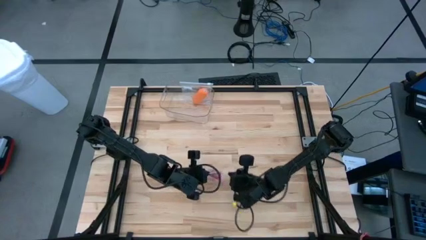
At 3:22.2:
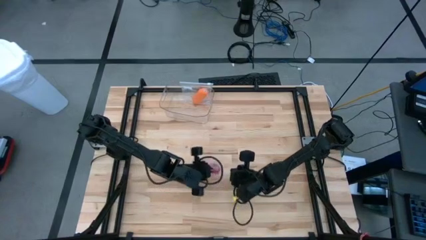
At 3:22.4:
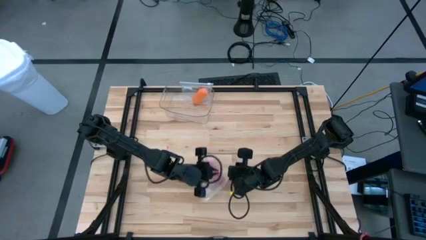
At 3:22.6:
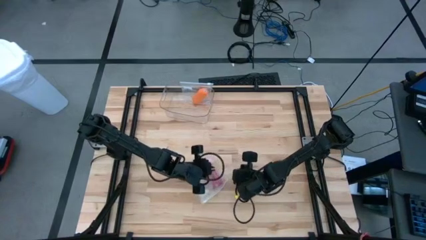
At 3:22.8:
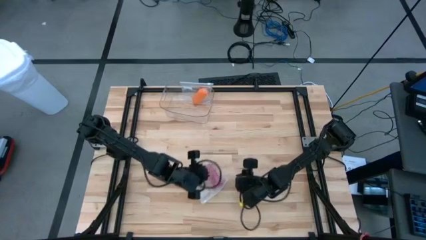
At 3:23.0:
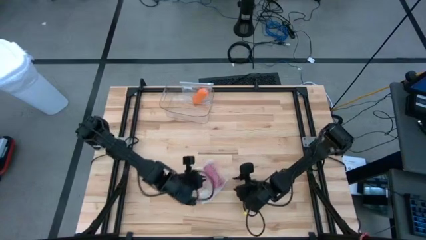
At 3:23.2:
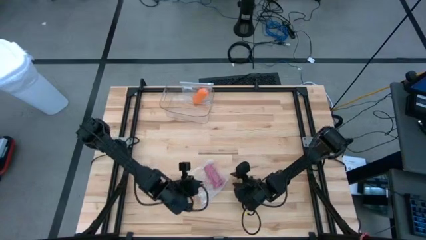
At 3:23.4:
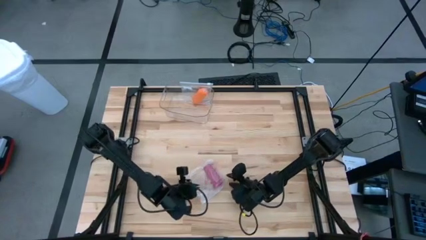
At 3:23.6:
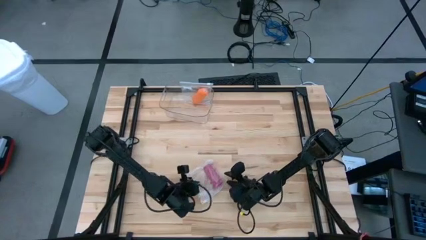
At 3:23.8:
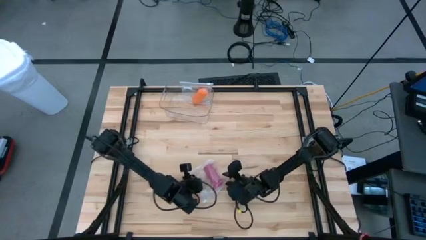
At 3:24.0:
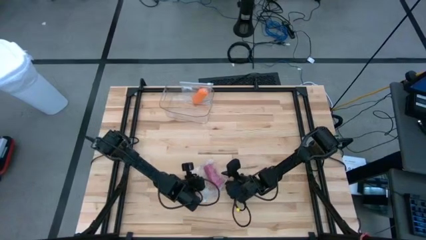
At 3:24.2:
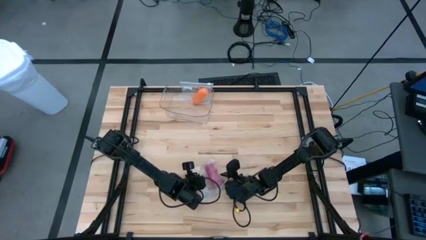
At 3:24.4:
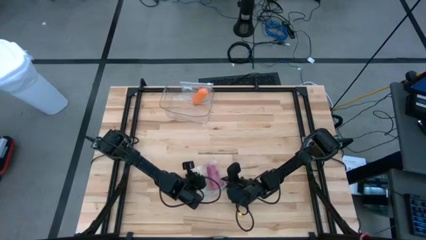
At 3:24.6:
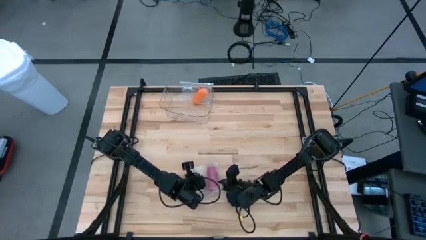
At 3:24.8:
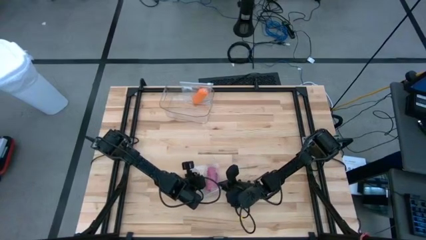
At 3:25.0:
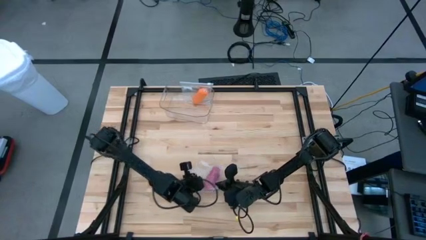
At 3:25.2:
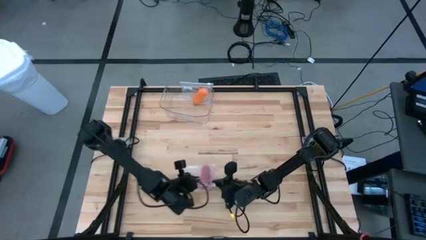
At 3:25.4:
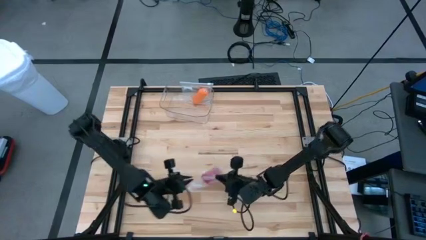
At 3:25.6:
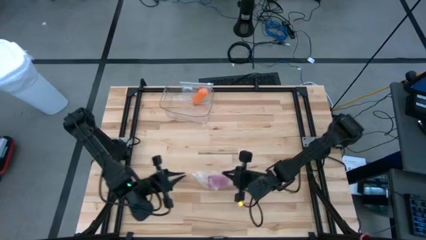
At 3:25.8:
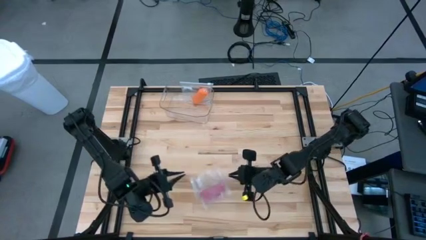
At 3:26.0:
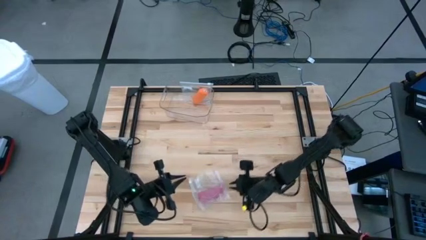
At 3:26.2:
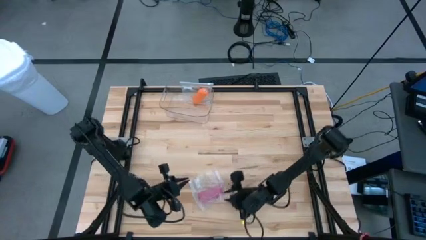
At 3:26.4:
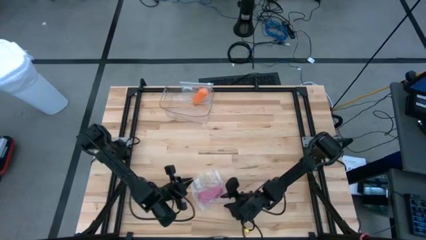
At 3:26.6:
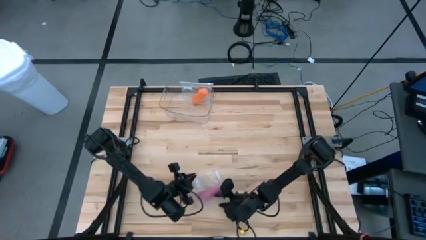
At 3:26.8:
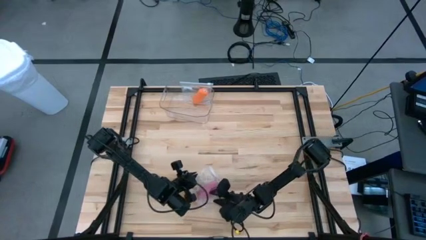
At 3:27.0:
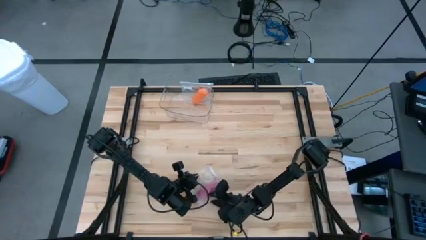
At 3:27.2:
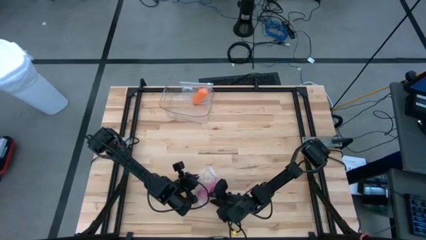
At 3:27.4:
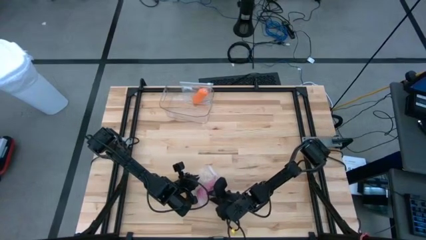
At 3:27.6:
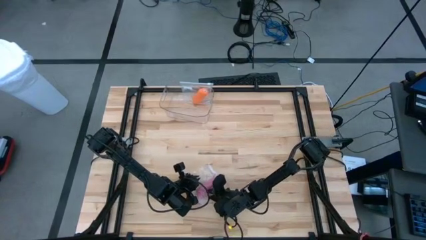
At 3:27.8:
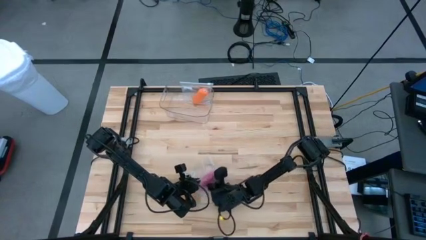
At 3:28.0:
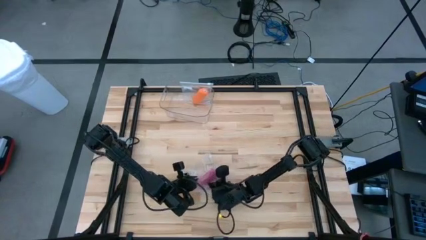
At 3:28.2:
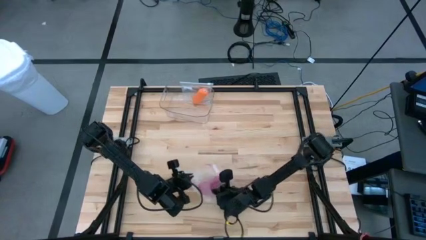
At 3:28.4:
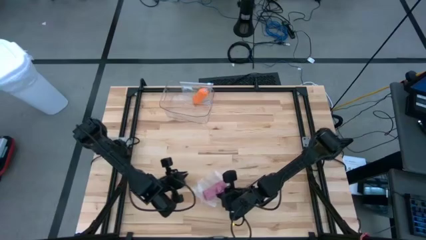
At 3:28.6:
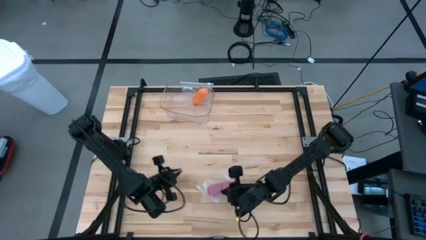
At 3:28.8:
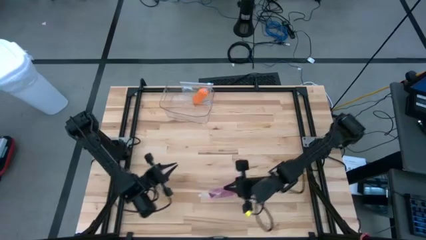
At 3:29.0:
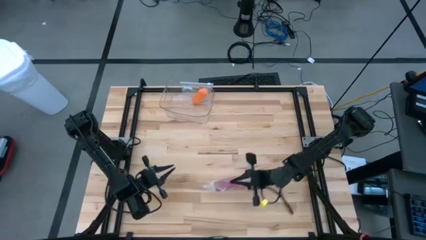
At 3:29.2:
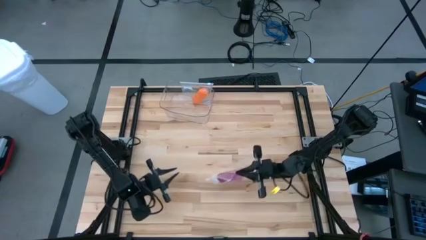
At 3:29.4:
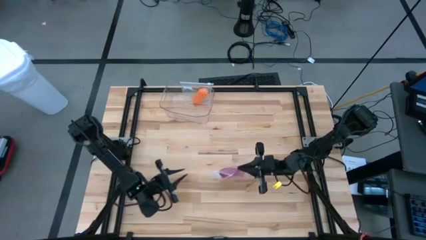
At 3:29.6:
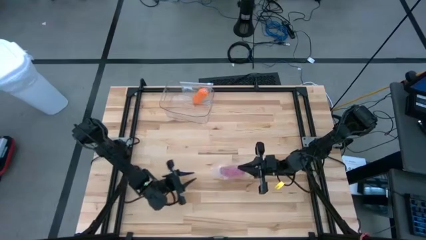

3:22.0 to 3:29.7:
Task: Roll bandage
Close the transparent zip bag

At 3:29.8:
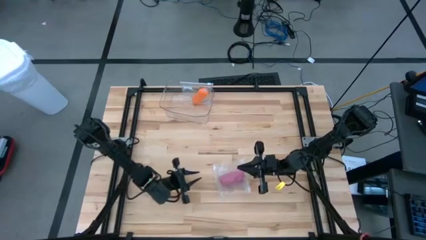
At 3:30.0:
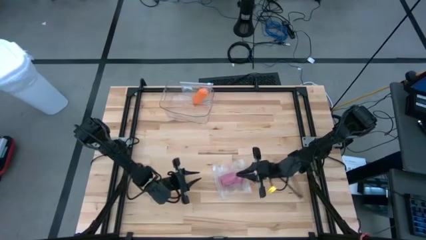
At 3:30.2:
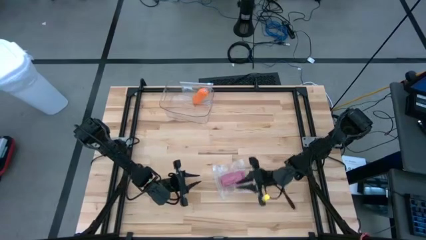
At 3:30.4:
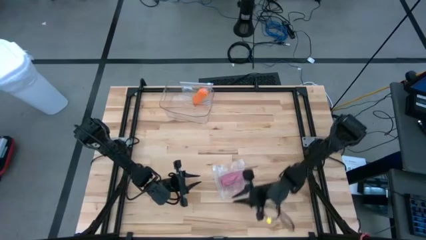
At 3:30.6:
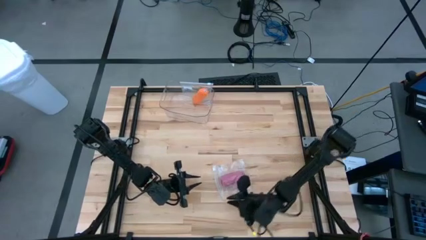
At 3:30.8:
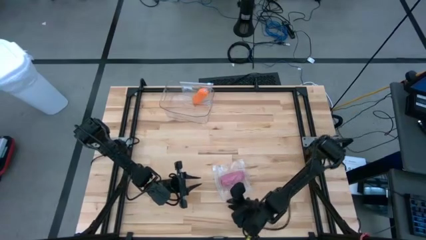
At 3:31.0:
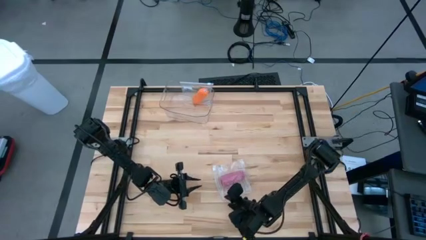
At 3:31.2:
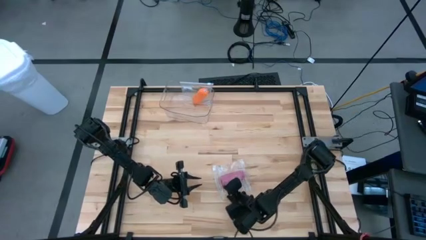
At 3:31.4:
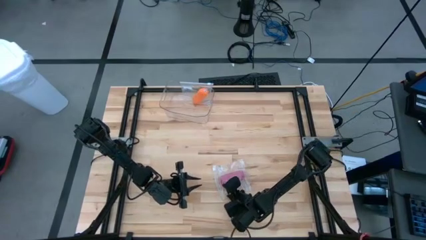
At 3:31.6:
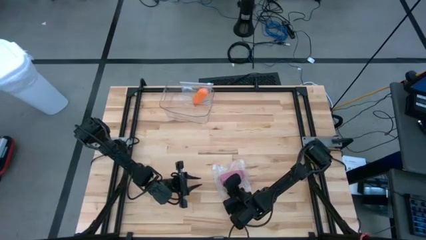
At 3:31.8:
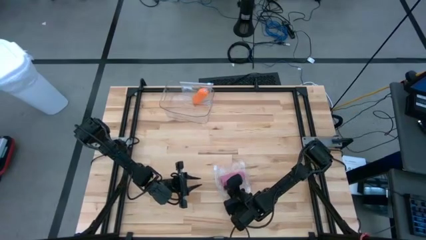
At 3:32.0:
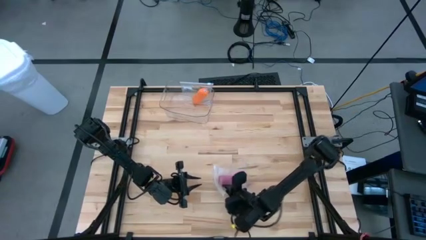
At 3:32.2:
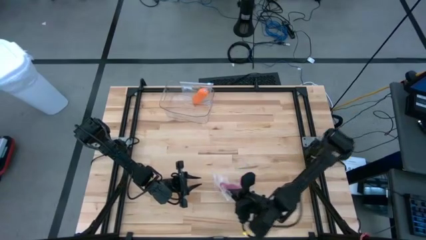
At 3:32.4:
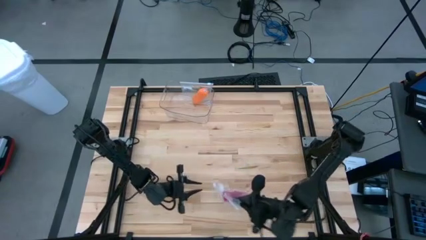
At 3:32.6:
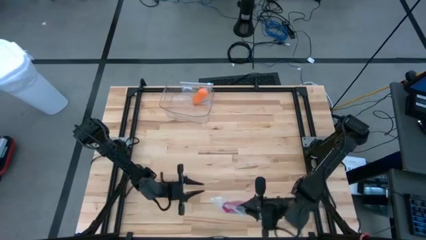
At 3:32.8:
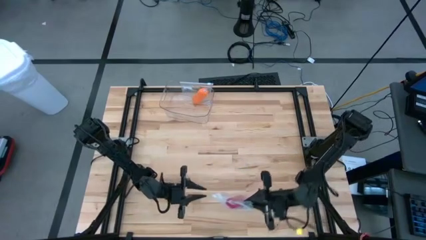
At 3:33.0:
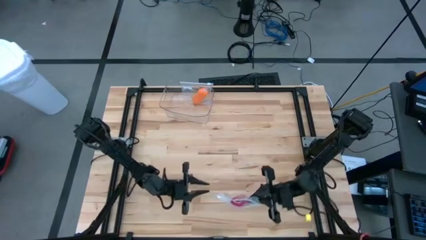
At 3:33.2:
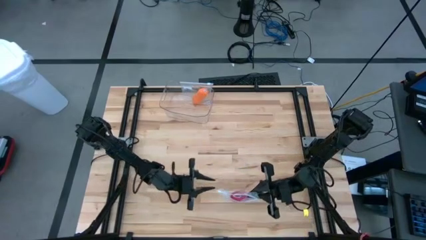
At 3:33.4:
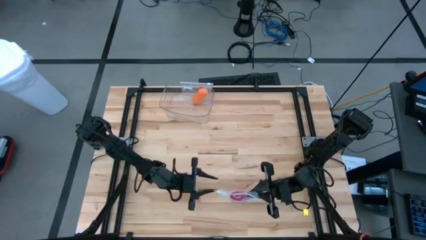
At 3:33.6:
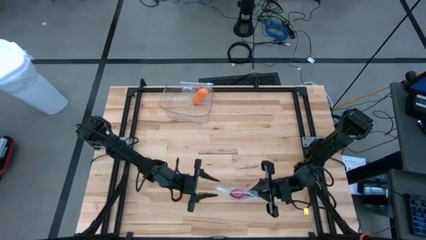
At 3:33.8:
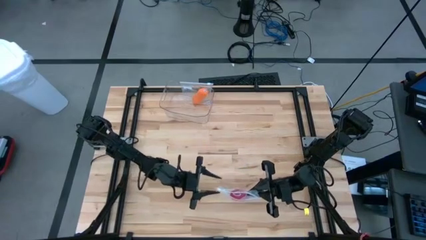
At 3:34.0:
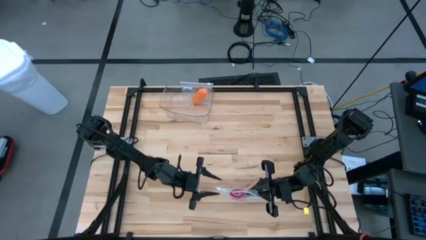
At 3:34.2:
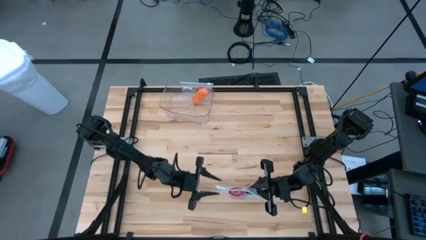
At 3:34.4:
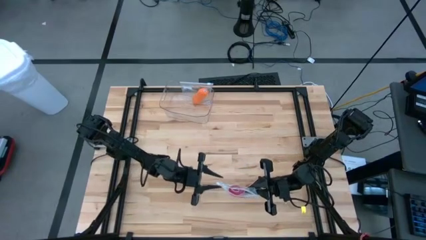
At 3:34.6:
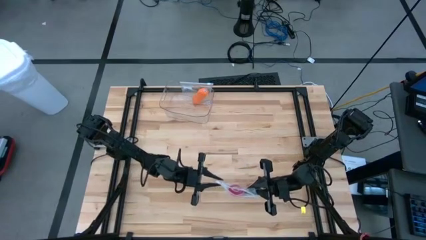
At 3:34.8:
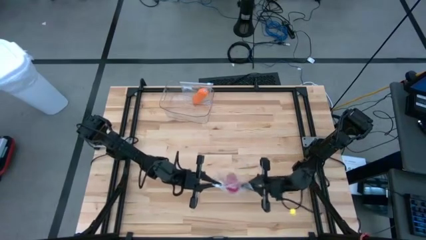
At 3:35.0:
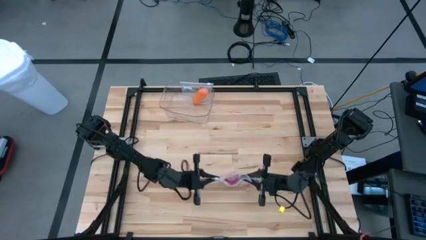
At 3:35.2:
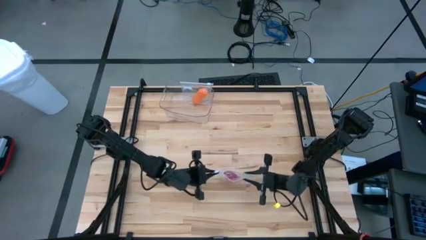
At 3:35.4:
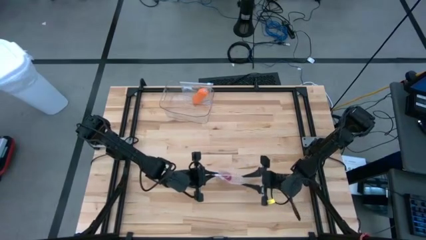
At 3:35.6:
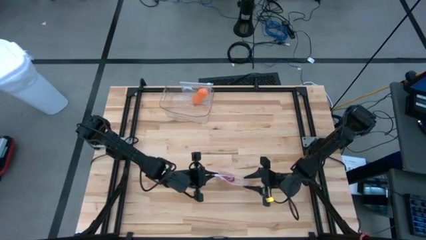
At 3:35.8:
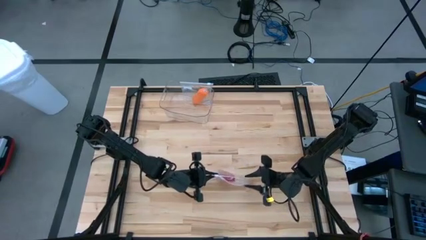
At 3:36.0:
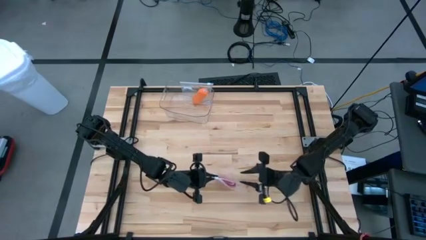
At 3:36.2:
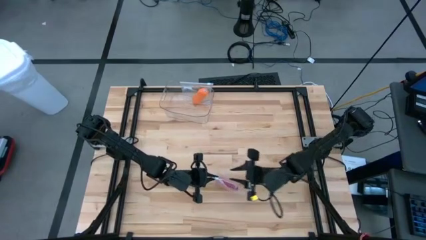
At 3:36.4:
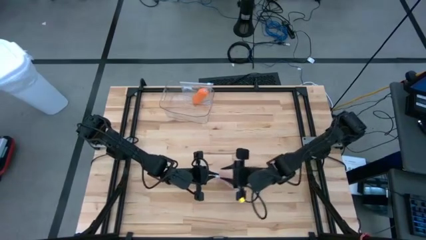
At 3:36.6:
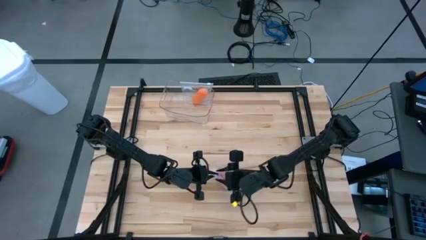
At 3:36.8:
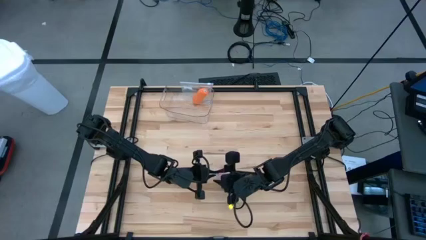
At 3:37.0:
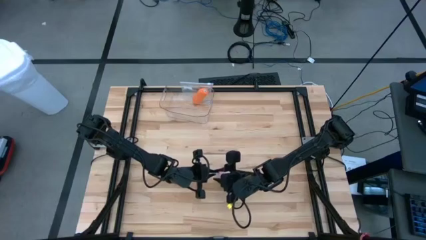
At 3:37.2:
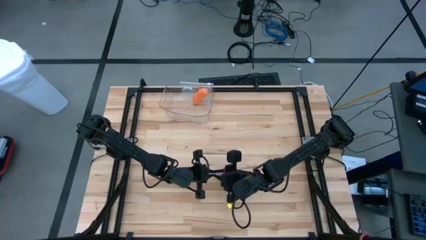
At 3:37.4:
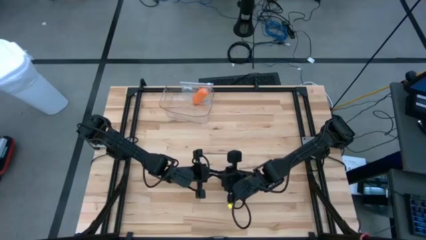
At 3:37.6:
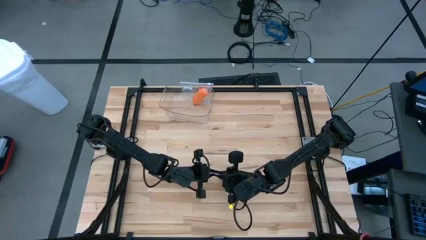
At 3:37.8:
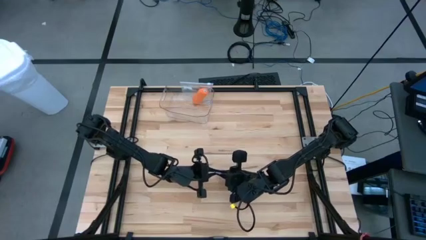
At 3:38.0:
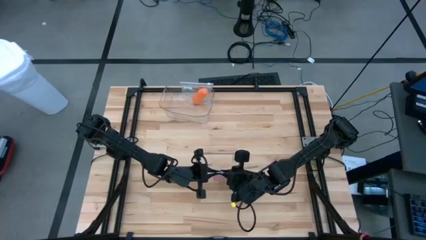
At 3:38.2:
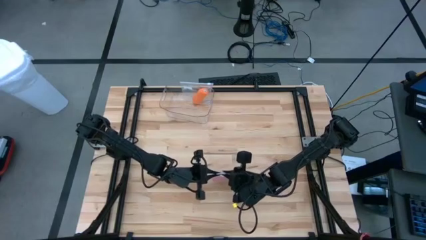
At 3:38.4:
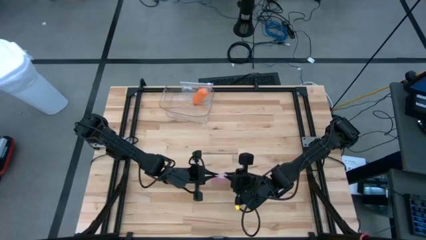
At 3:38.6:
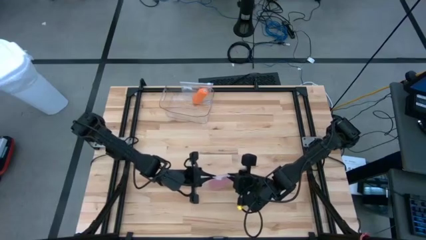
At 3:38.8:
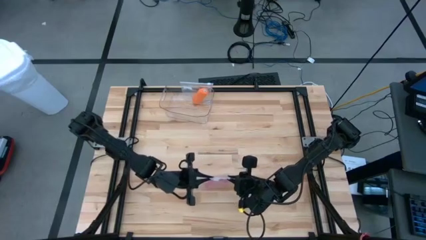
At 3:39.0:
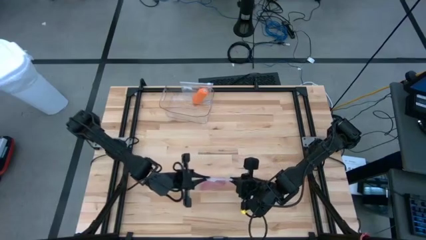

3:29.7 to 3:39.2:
Close the transparent zip bag
